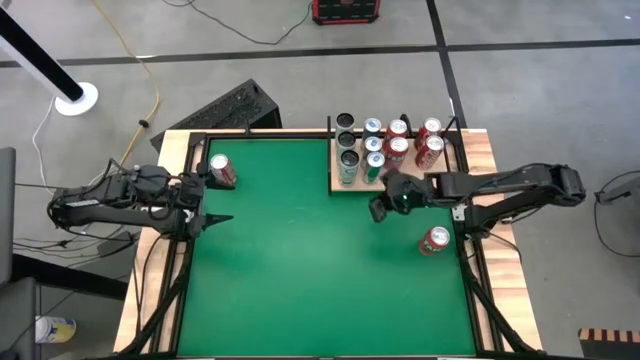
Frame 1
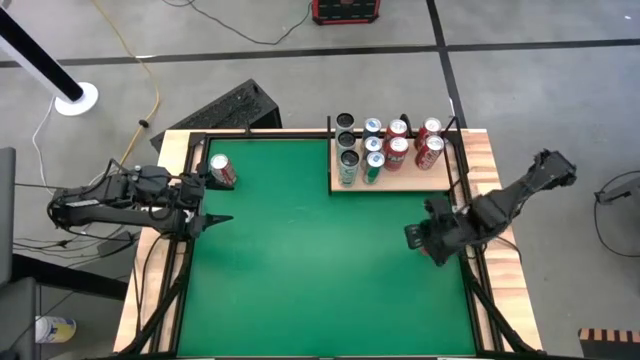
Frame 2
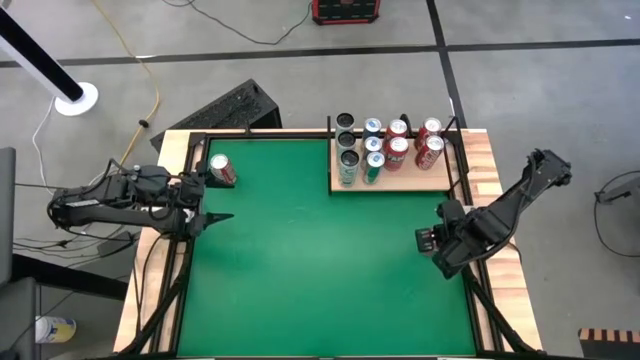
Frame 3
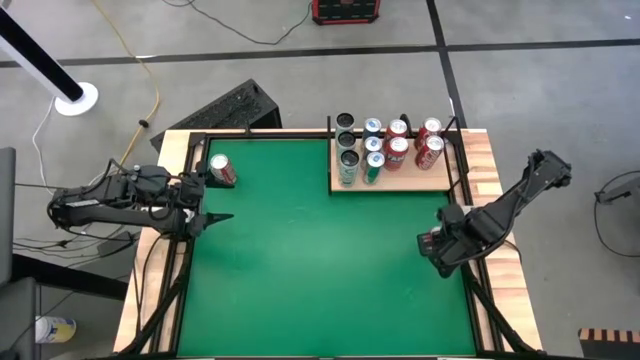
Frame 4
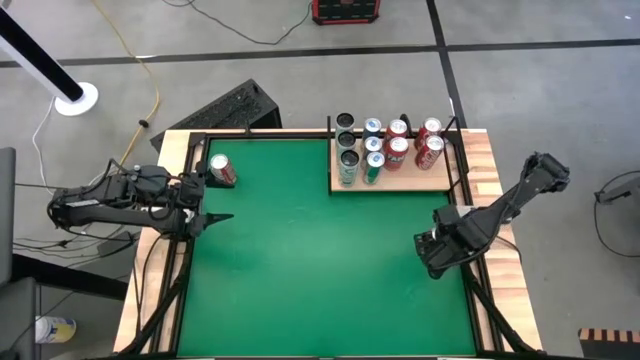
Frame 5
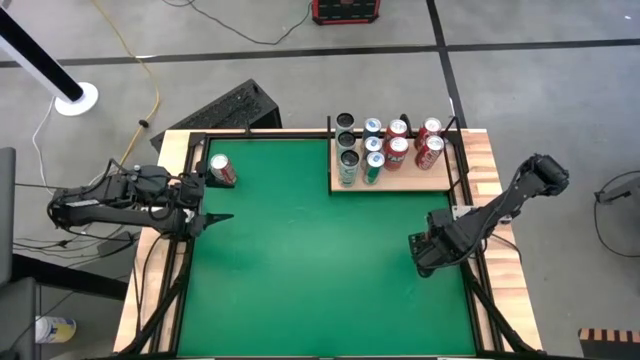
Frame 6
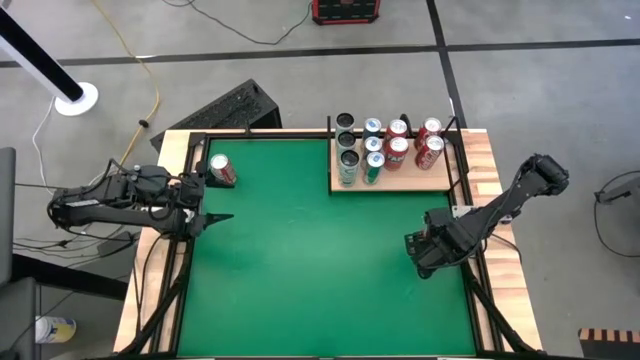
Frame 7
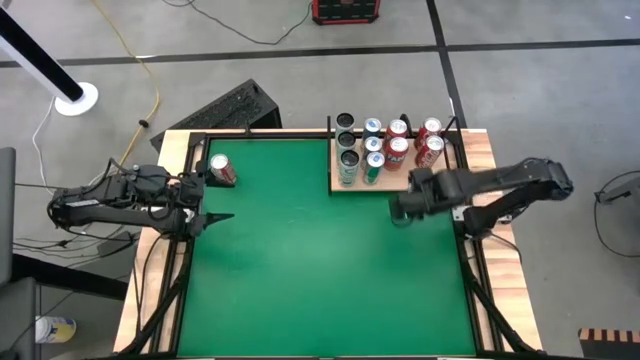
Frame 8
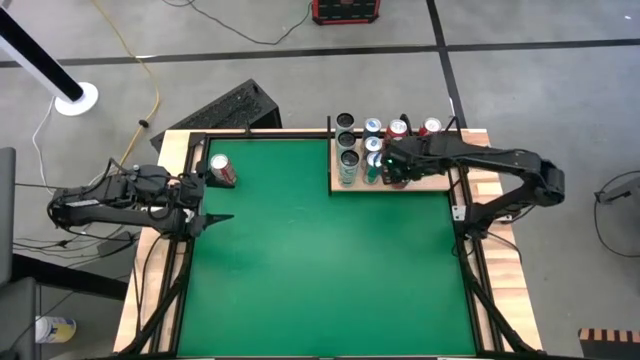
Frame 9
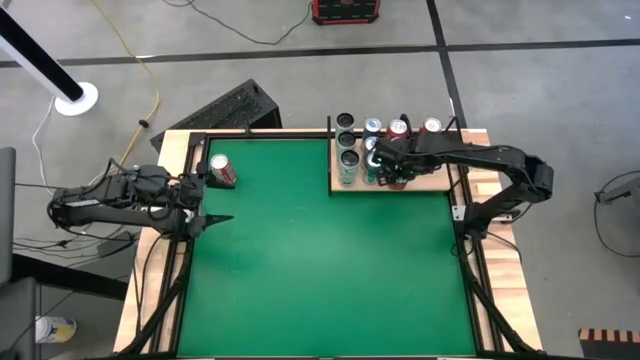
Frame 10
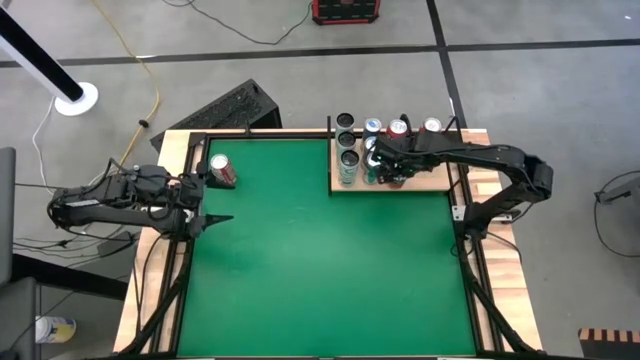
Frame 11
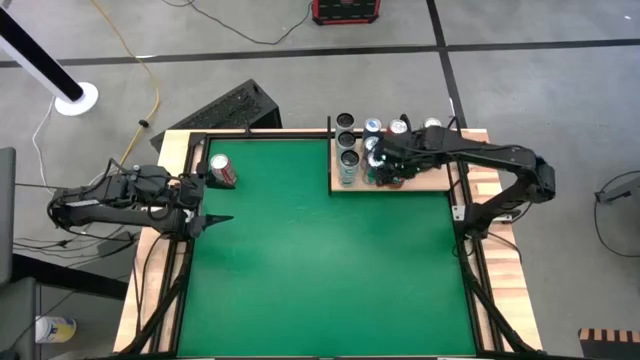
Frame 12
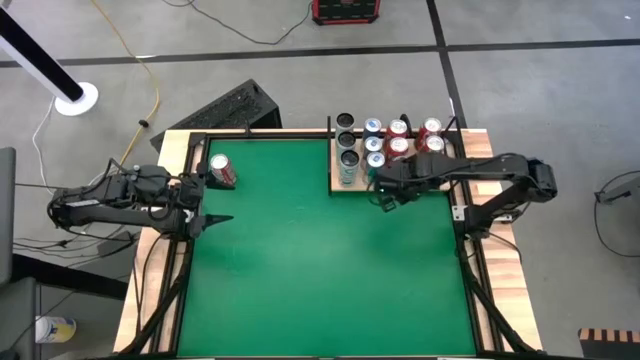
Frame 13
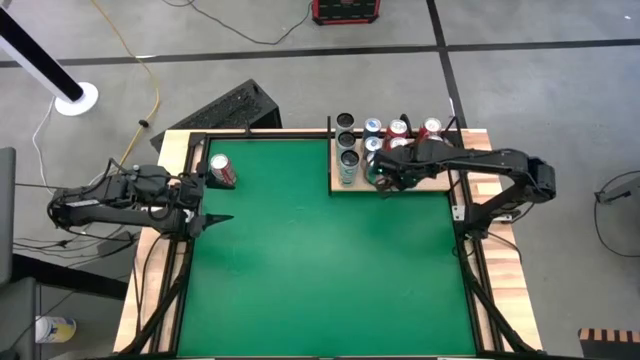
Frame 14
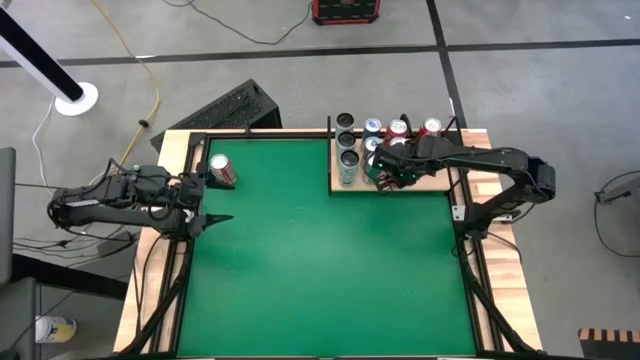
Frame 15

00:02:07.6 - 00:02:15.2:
Task: Sort soda cans
Put the orange soda can on the shelf align with the other orange soda cans

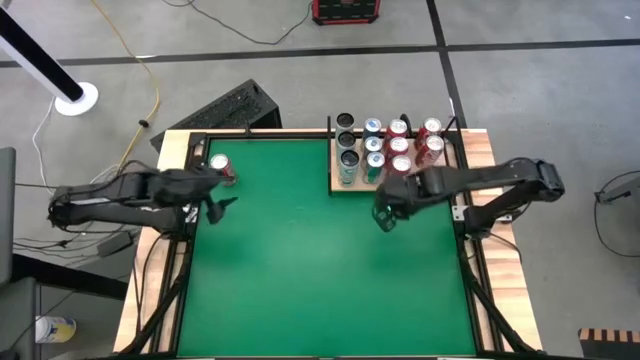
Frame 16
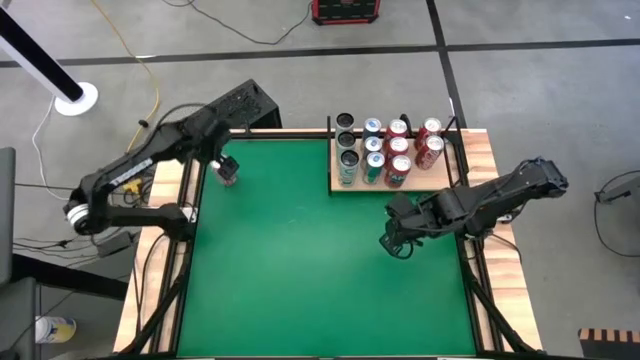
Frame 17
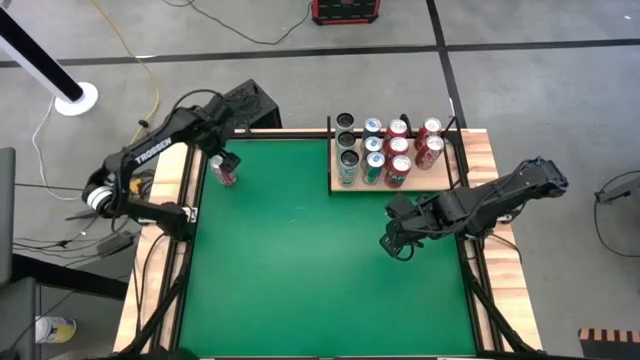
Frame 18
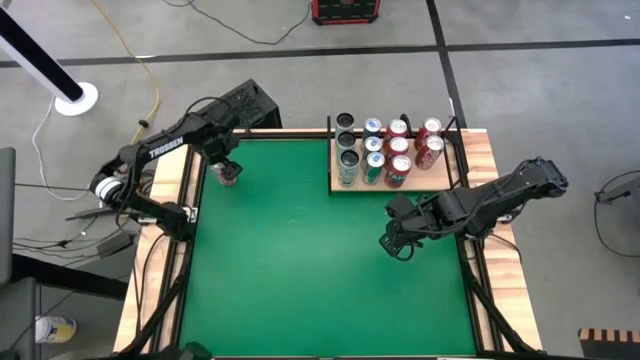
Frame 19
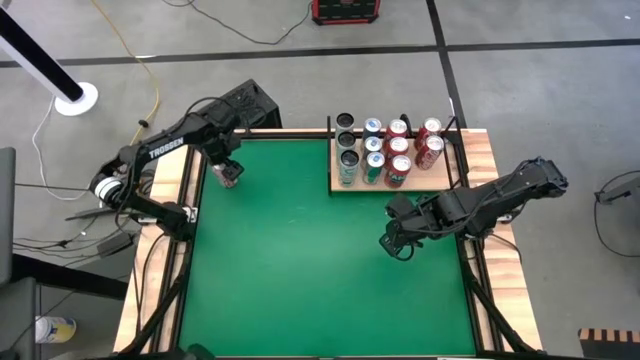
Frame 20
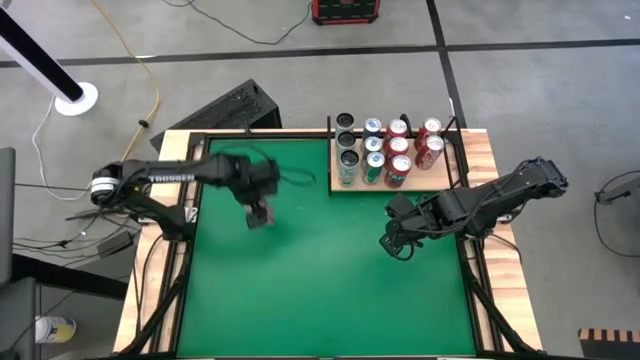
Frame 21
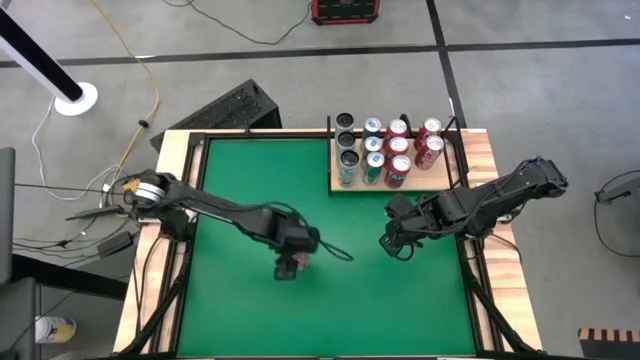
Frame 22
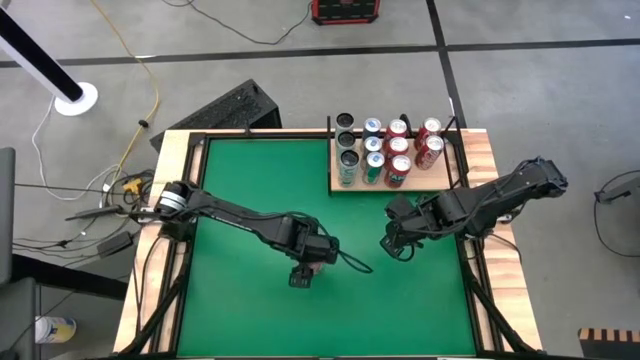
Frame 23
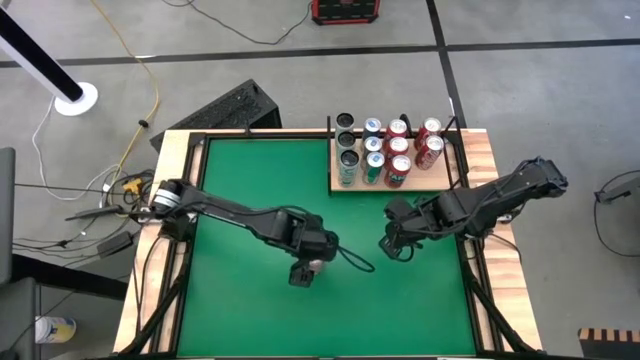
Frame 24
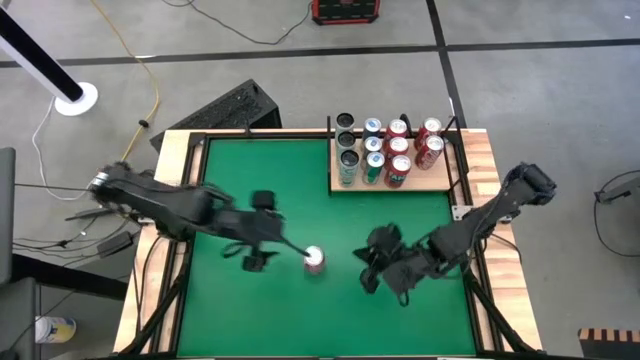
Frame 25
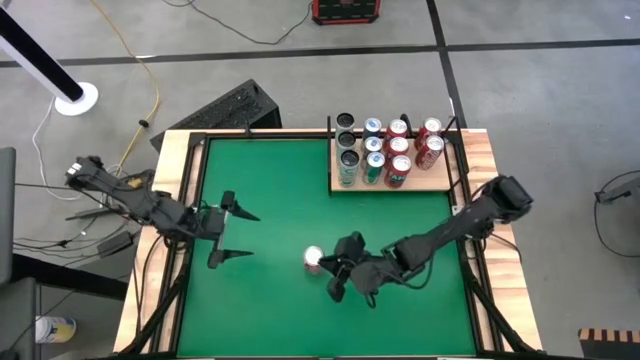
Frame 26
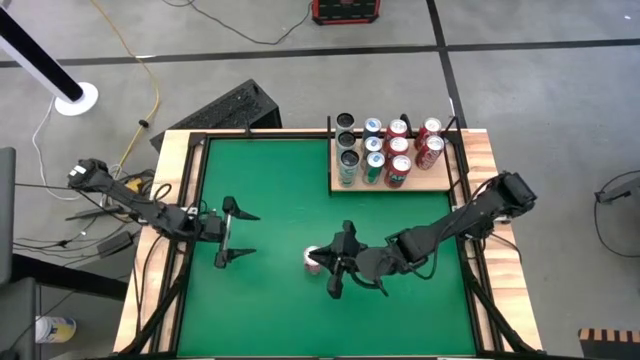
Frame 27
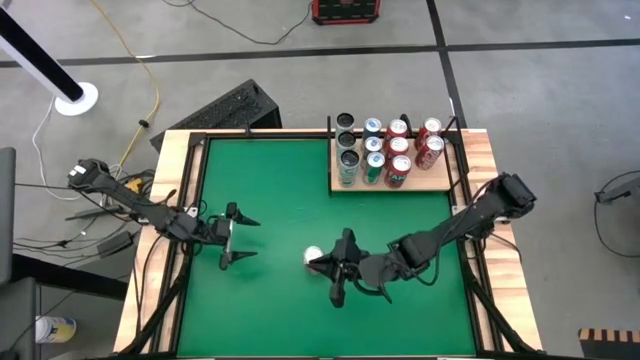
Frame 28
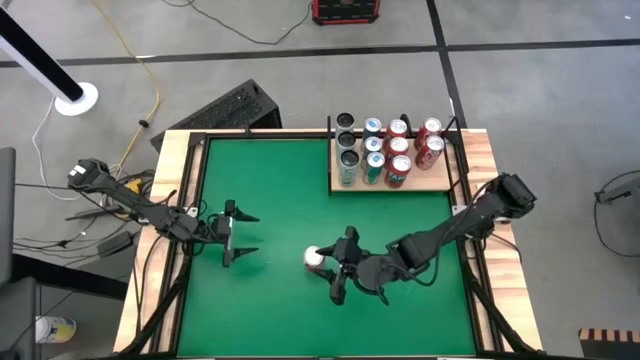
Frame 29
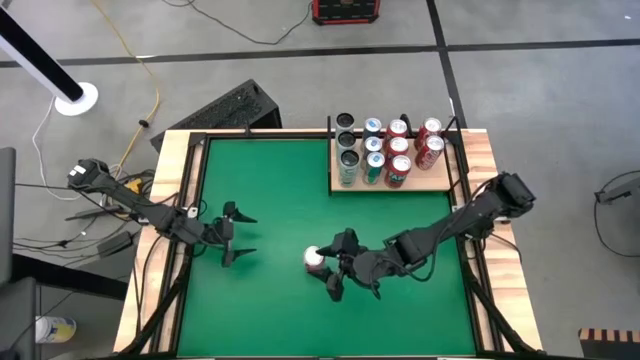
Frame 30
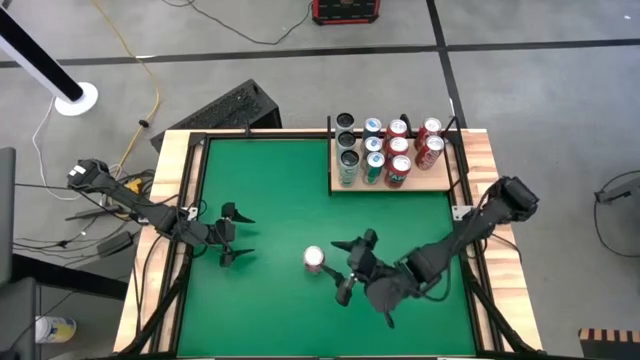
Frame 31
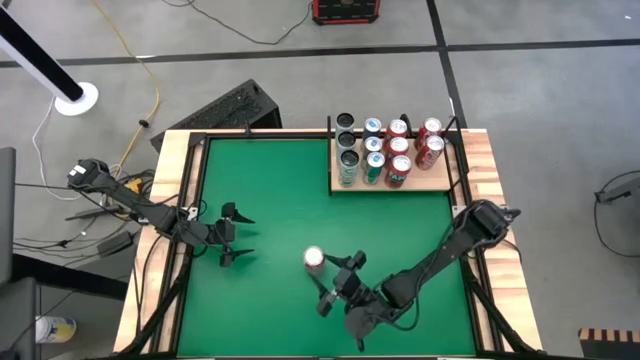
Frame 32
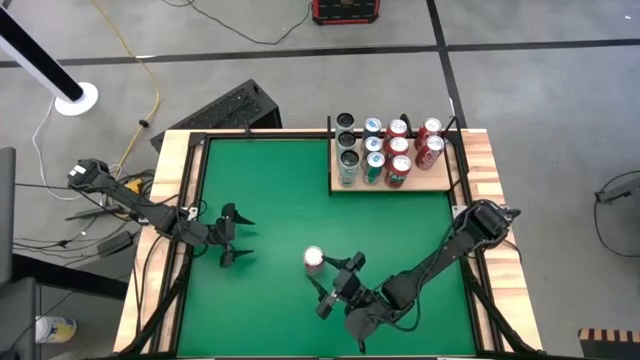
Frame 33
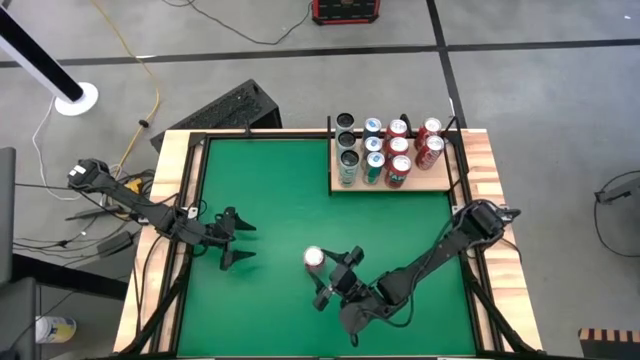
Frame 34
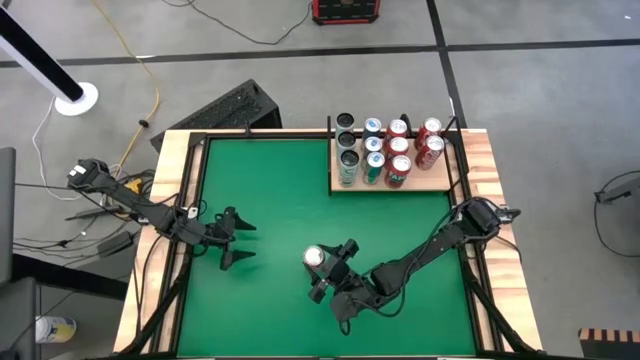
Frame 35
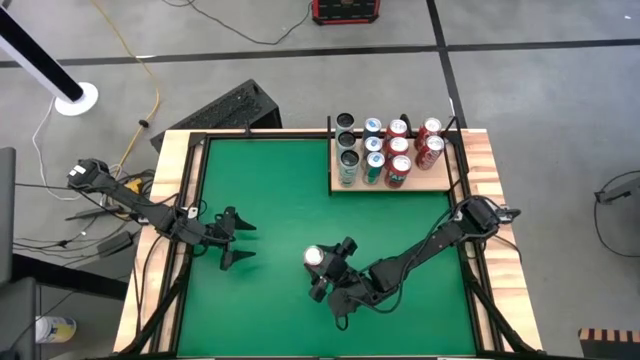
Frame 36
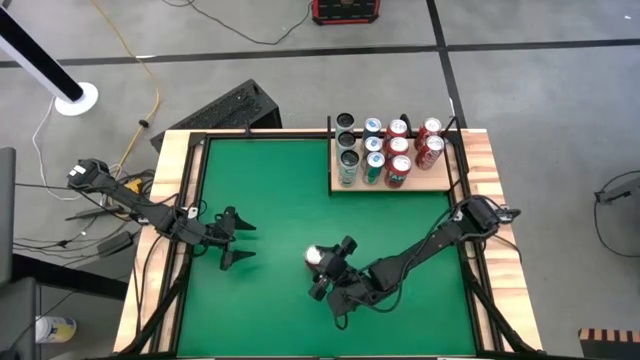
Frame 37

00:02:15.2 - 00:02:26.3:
Put the red soda can on the shelf align with the other red soda cans
